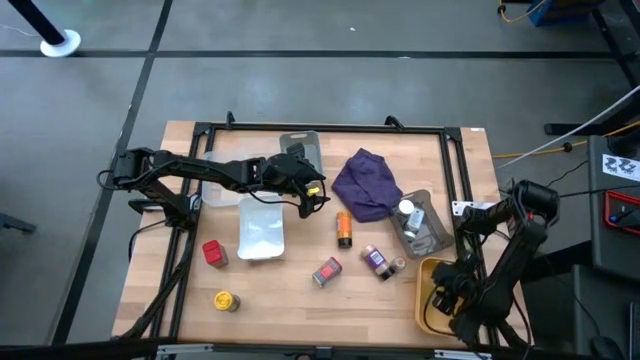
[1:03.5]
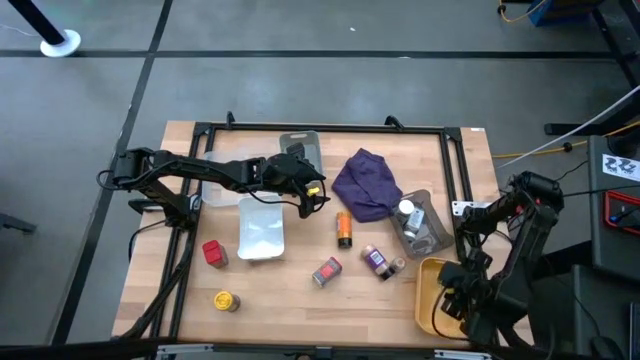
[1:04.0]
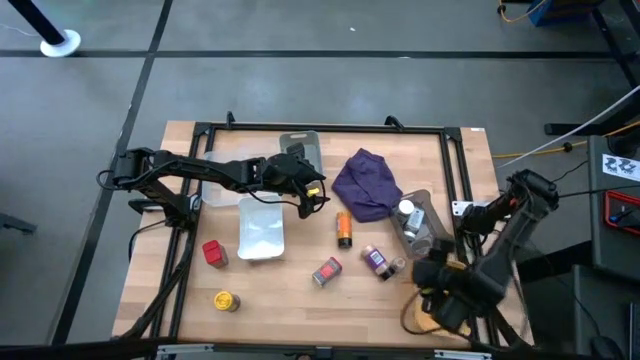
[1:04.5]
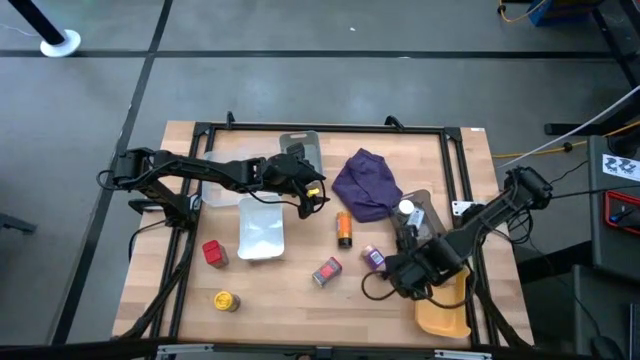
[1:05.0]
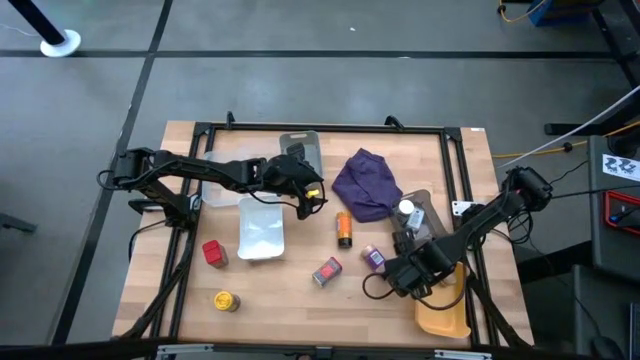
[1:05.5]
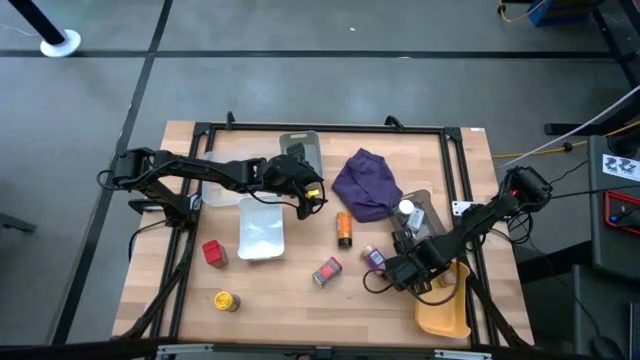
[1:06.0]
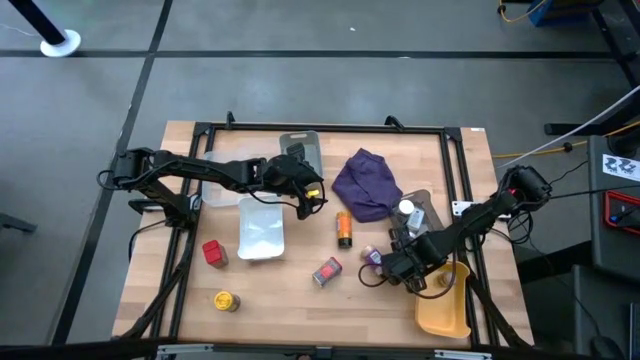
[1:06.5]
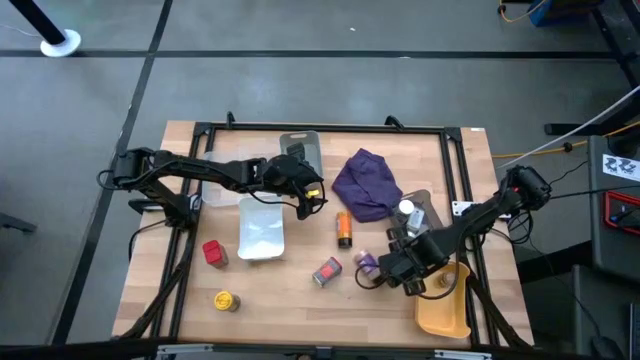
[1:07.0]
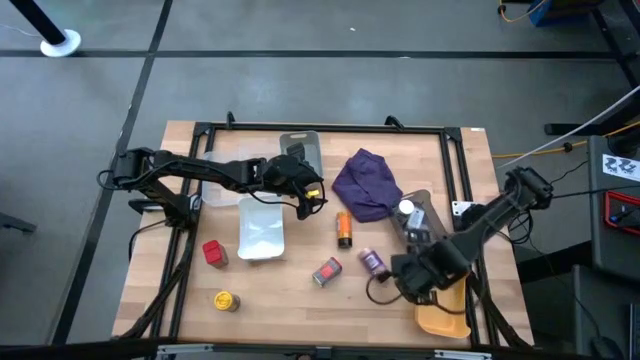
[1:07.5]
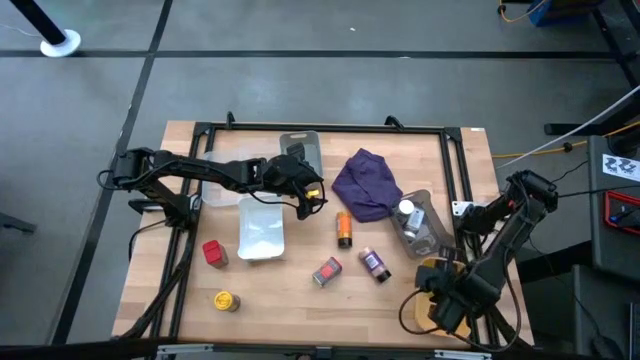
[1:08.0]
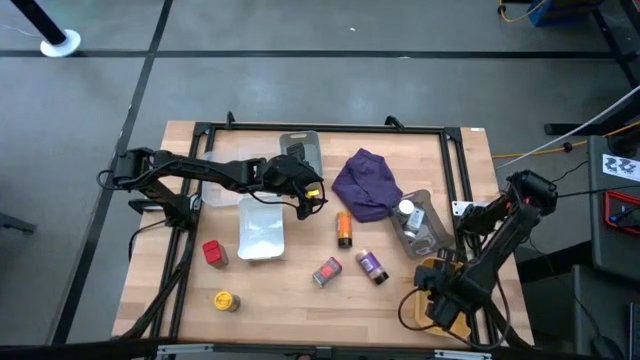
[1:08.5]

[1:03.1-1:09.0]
Task: Sort spices by type
Put the brown seasoning bottle into the yellow bin

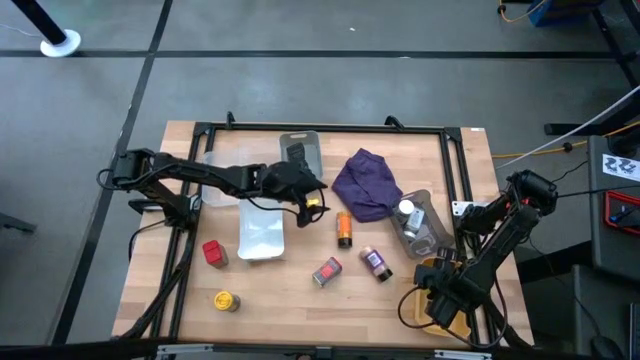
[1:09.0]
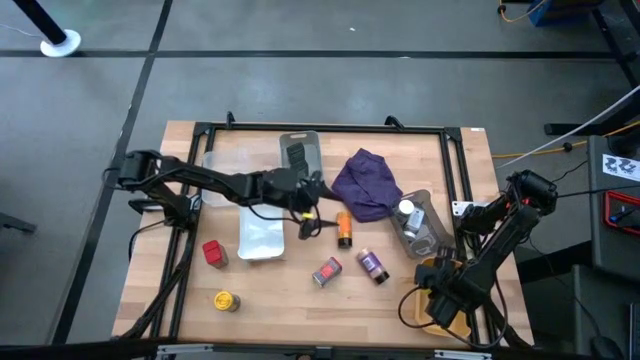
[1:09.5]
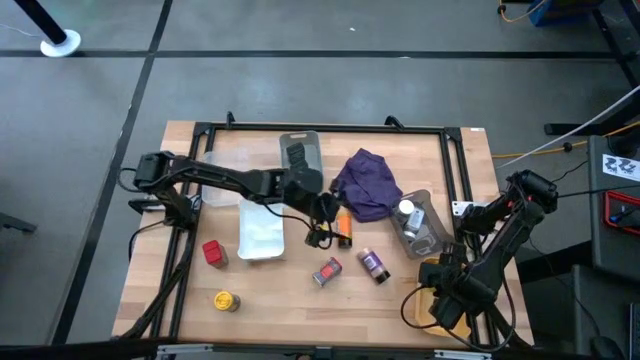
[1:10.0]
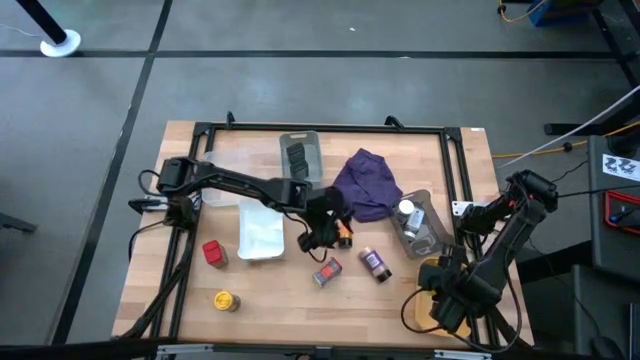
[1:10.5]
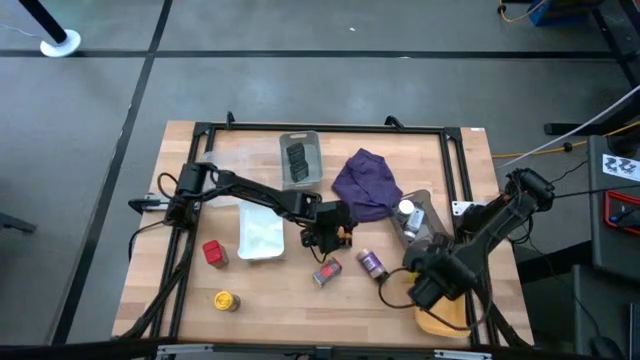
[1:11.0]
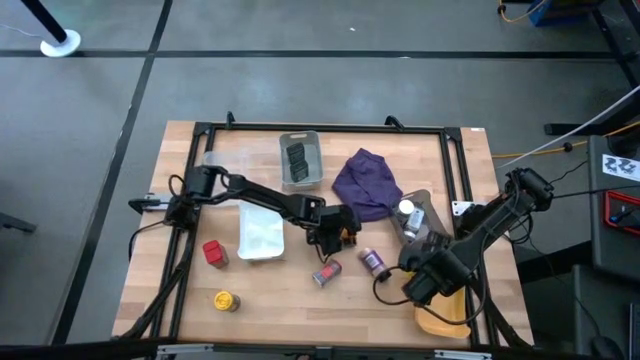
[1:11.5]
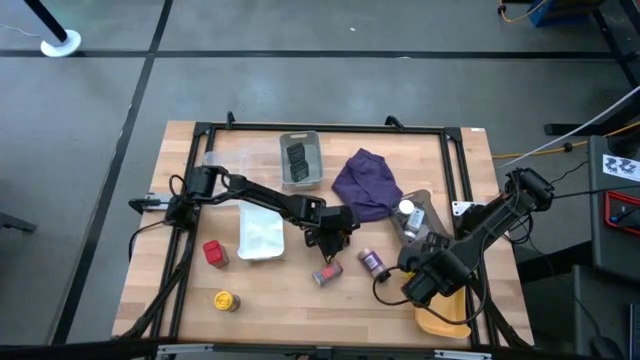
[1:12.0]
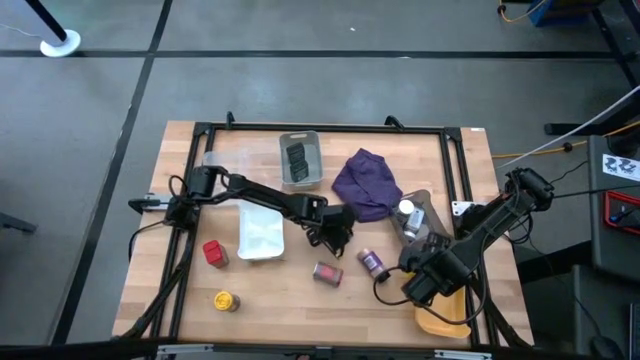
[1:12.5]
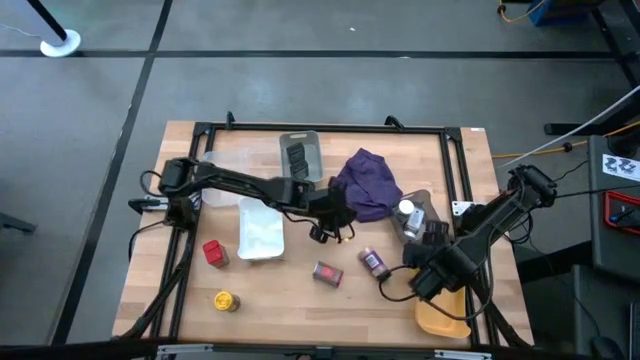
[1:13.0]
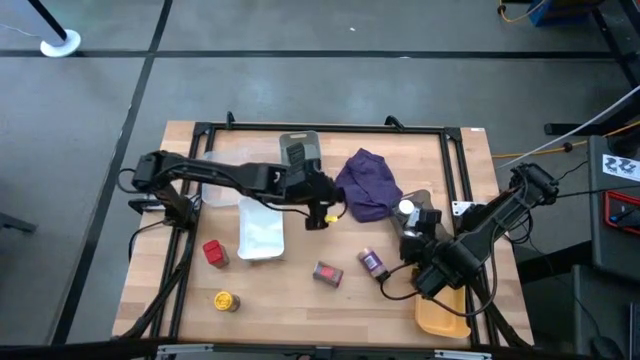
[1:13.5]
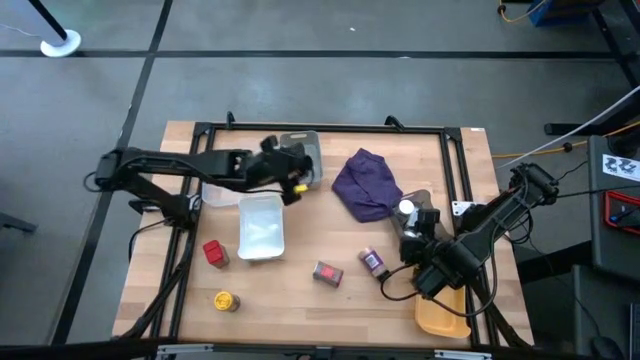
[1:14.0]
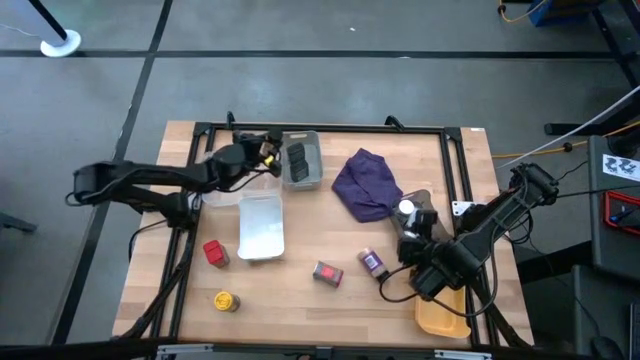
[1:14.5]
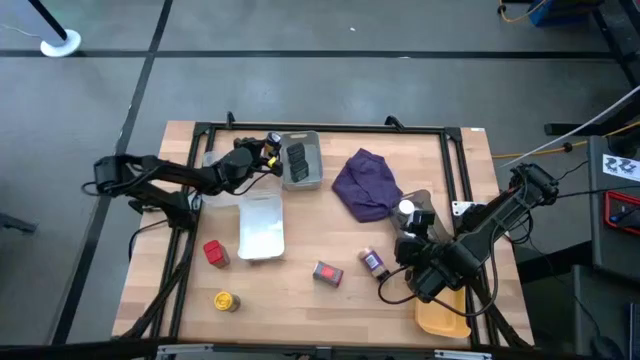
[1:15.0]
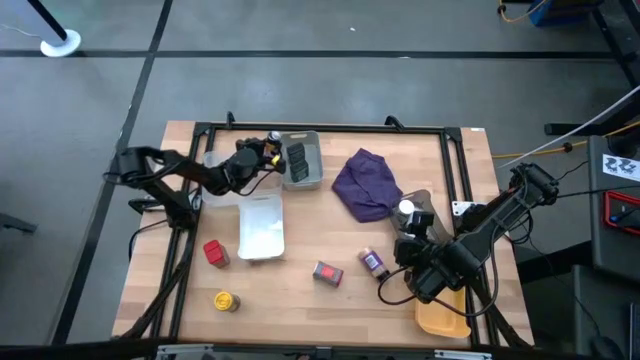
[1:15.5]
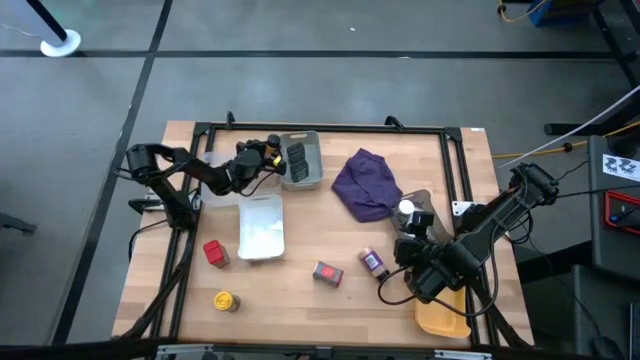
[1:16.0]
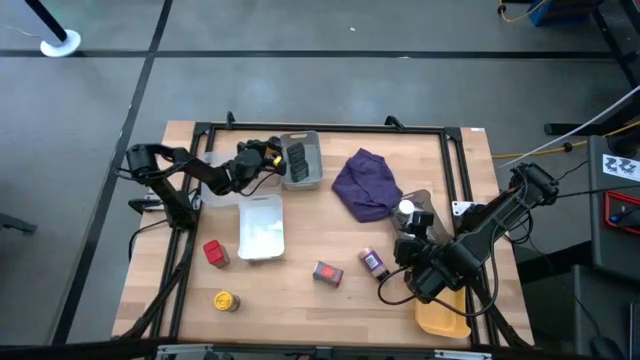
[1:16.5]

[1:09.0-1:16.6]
Put the center black seasoning bottle into the top right transparent bin

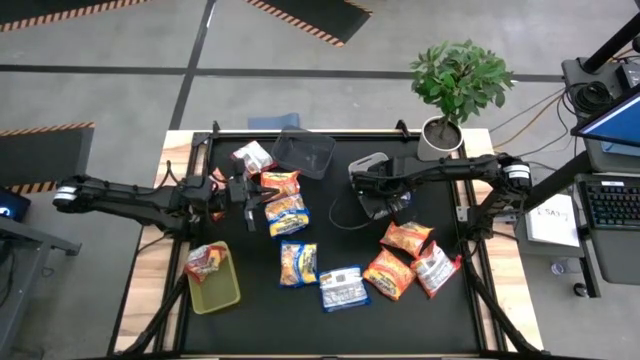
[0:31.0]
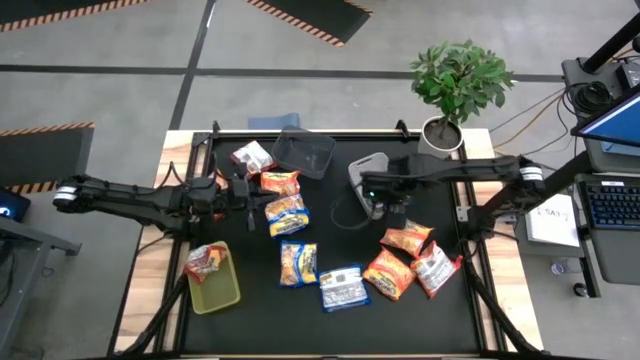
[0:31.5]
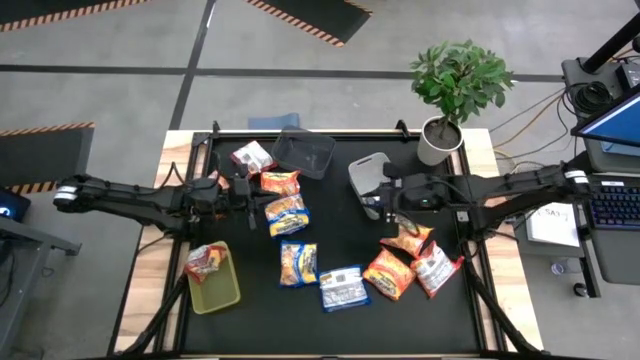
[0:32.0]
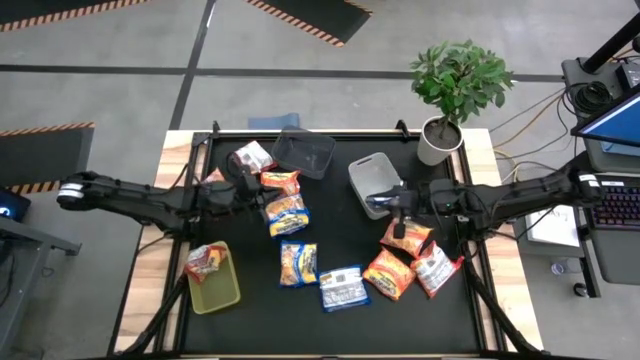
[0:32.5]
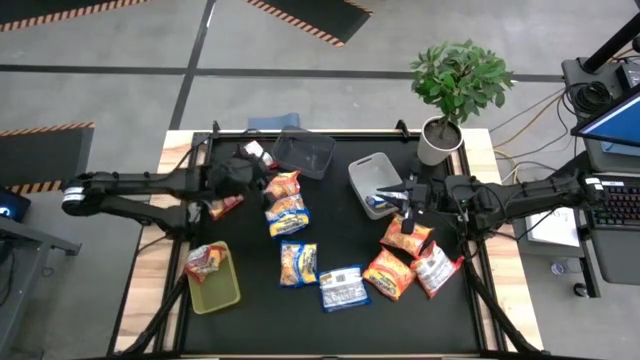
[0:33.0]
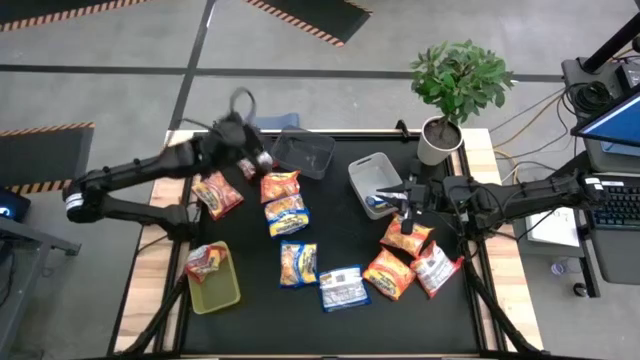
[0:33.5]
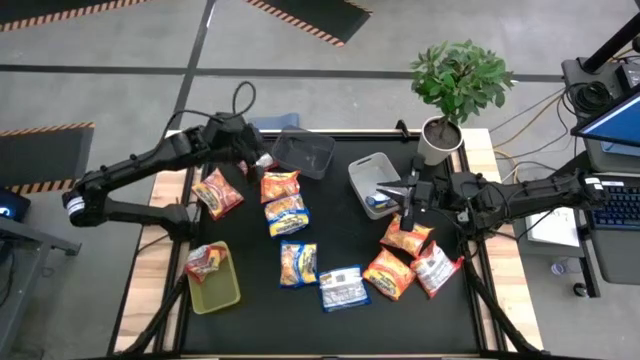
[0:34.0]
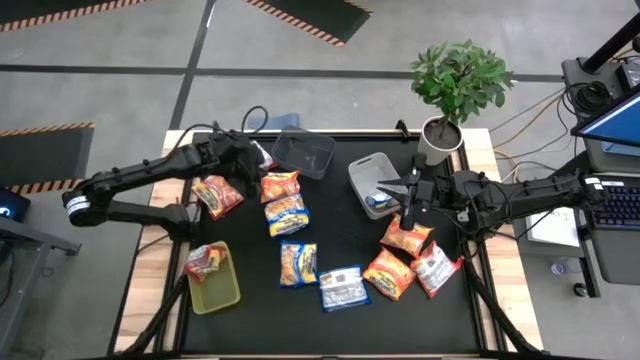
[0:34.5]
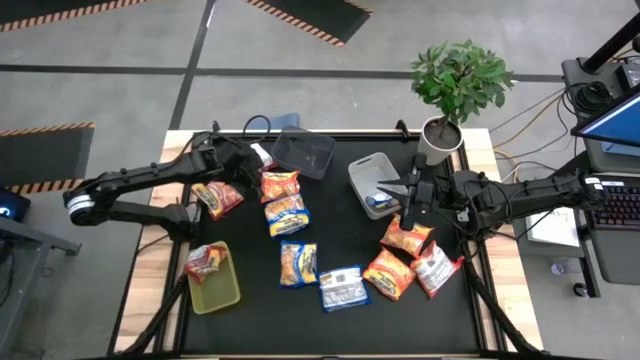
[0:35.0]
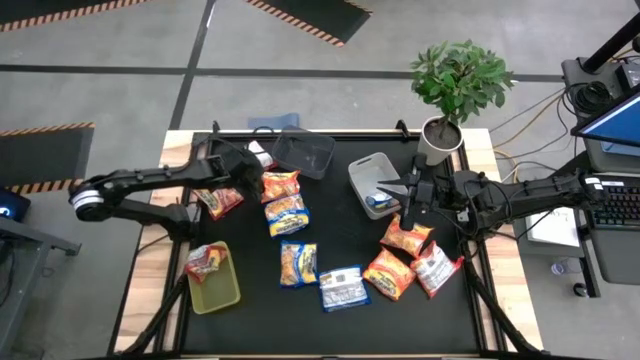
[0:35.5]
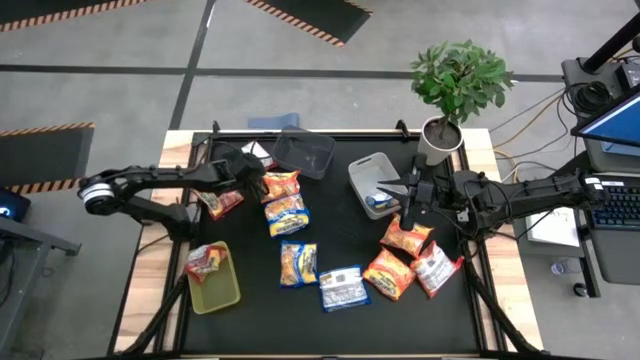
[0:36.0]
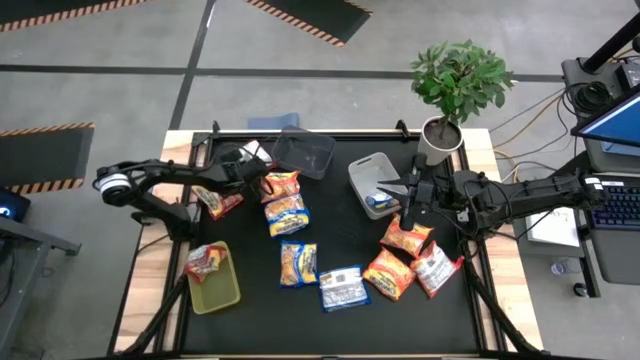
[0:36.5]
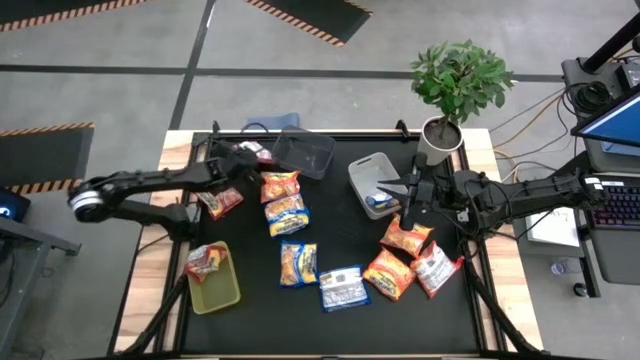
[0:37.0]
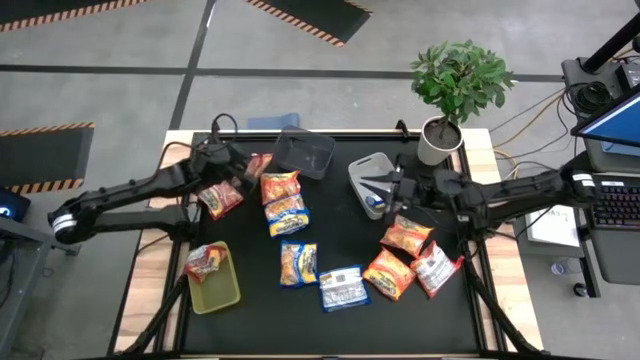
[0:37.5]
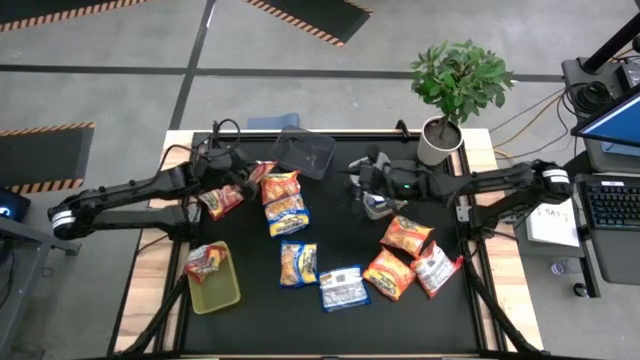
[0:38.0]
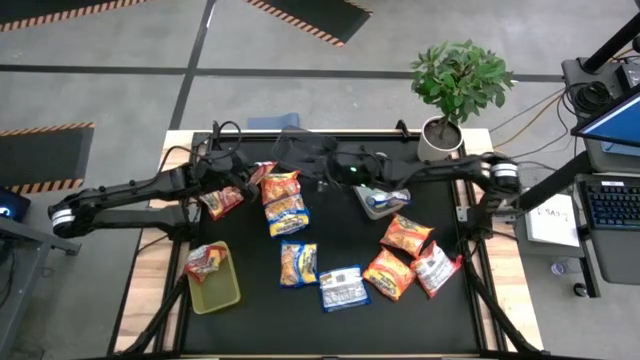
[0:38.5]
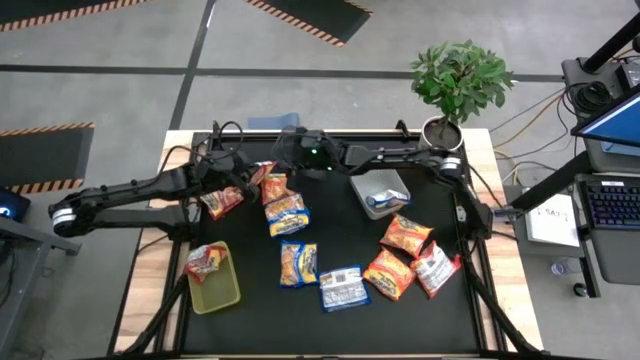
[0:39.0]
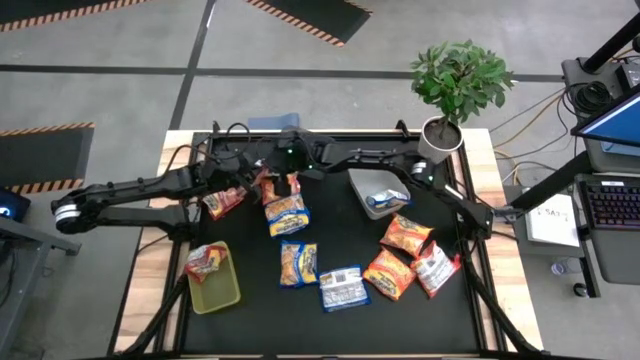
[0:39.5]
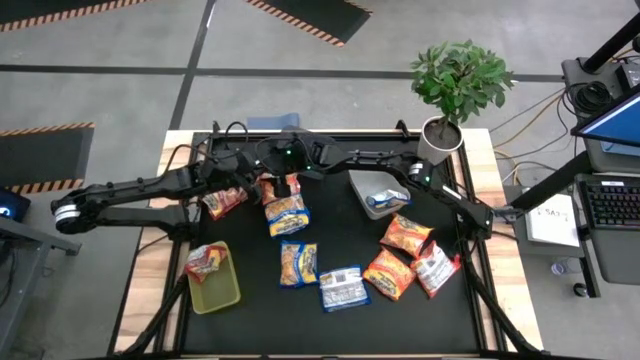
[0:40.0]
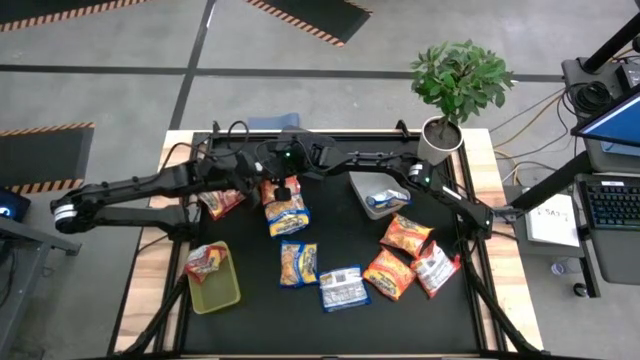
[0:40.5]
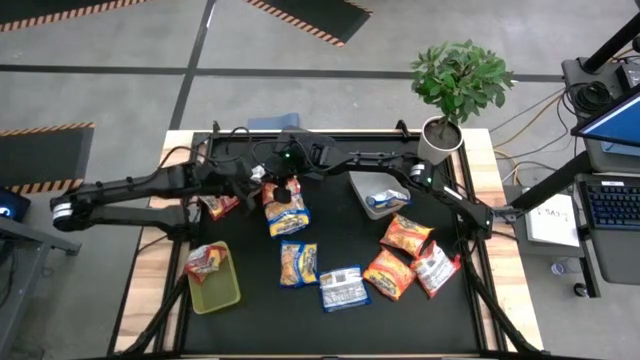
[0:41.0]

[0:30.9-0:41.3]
Task: Sort Maruchan noodles
Put the red noodle pack into the yellow bin
